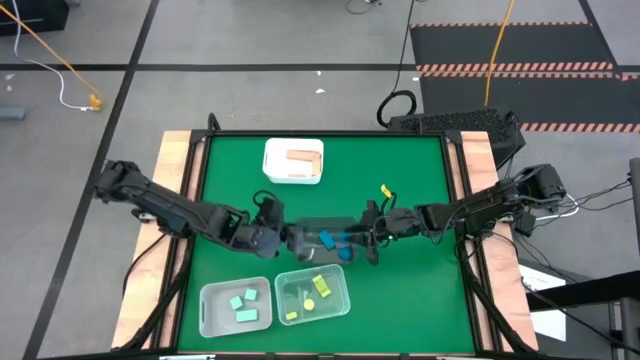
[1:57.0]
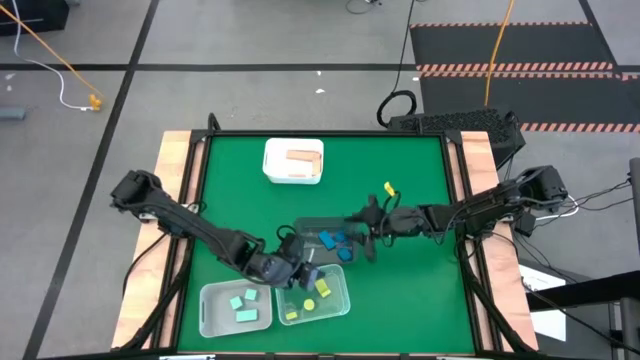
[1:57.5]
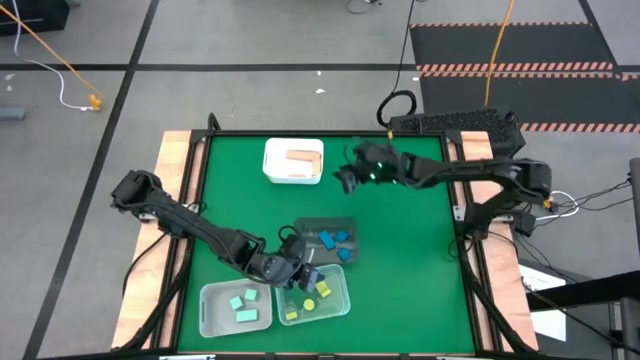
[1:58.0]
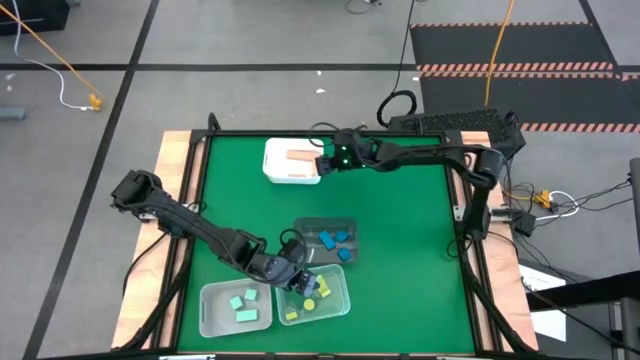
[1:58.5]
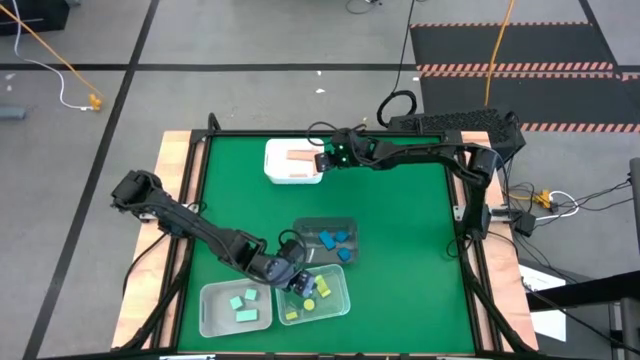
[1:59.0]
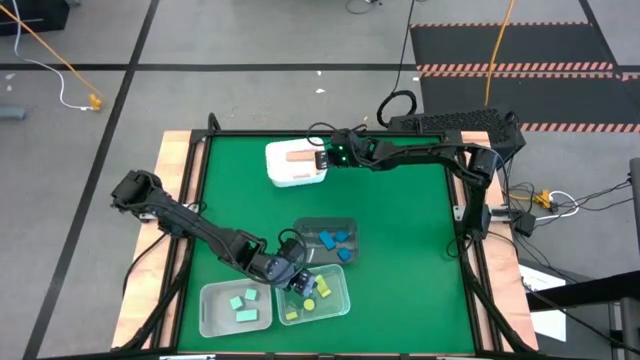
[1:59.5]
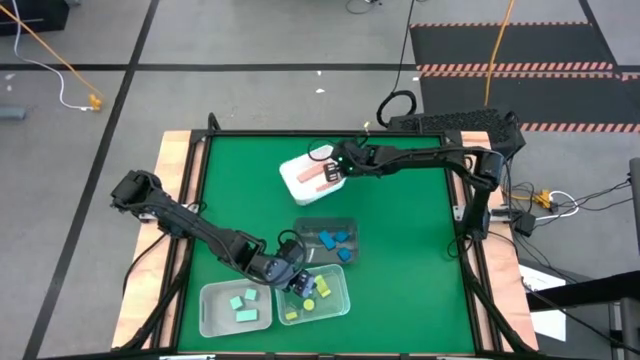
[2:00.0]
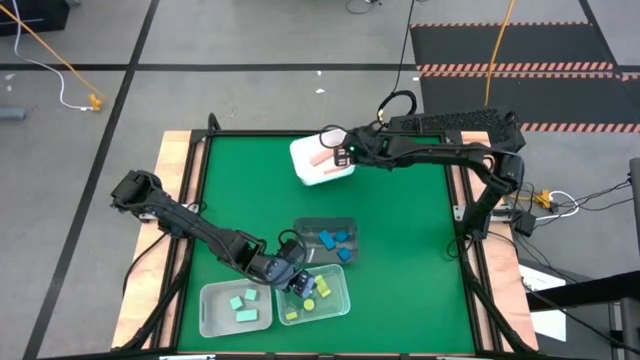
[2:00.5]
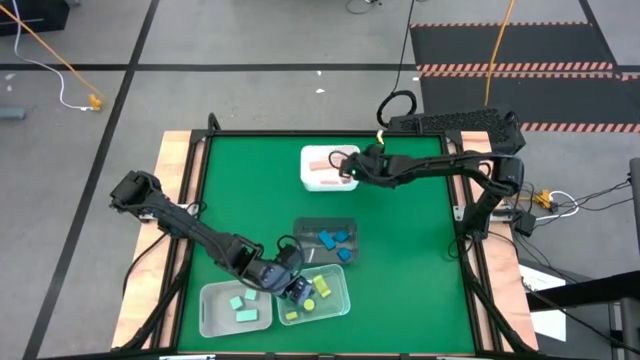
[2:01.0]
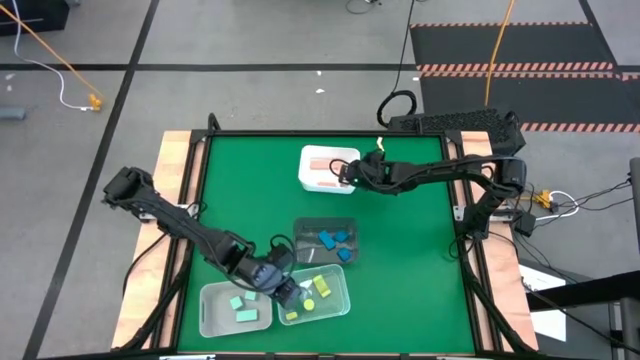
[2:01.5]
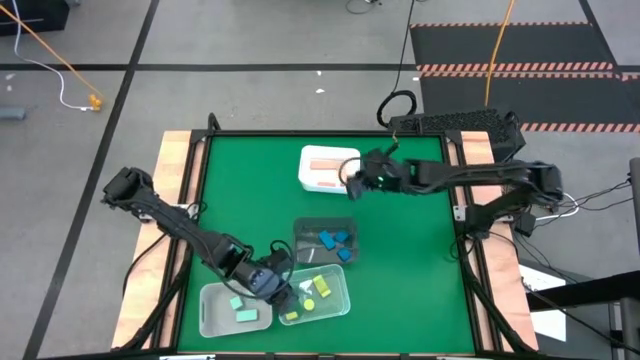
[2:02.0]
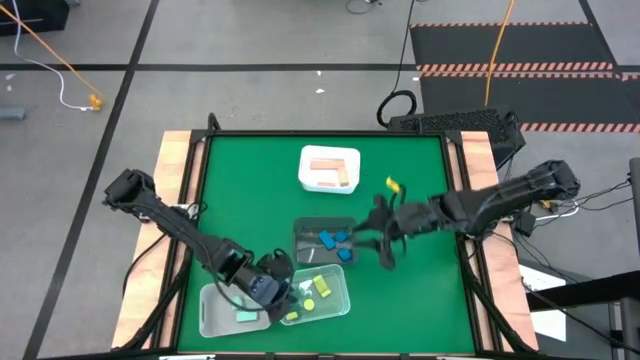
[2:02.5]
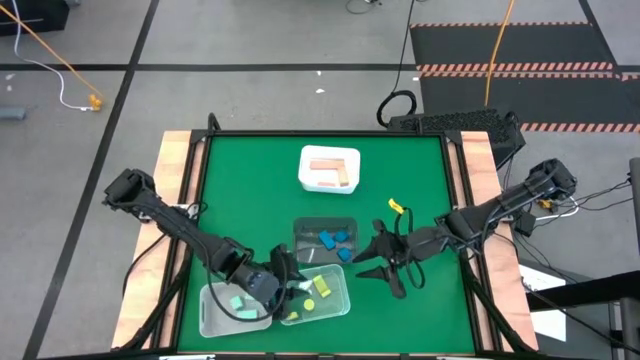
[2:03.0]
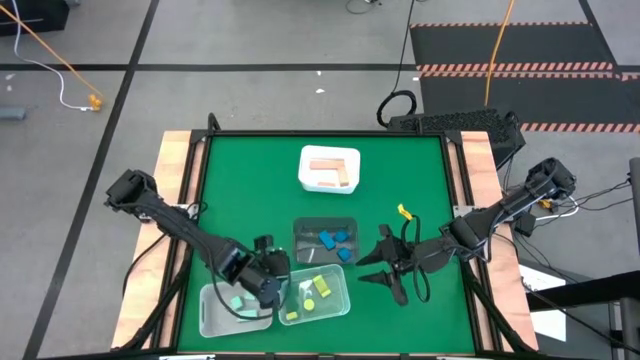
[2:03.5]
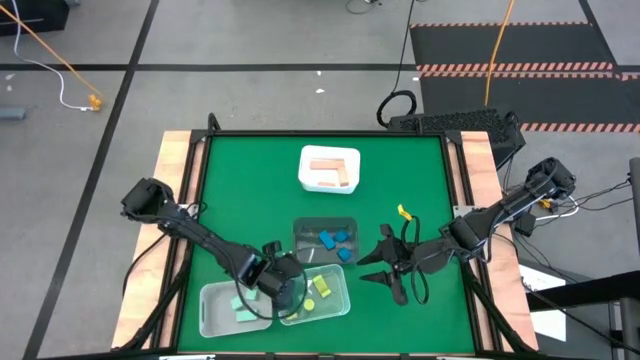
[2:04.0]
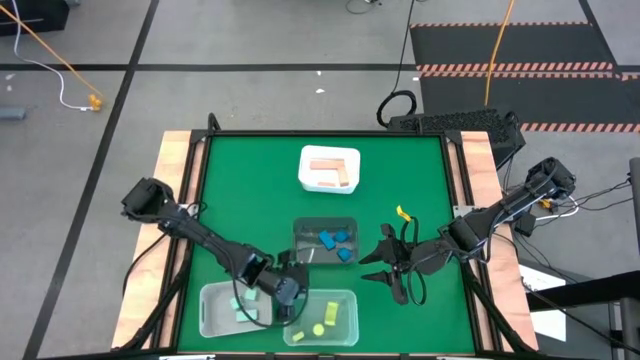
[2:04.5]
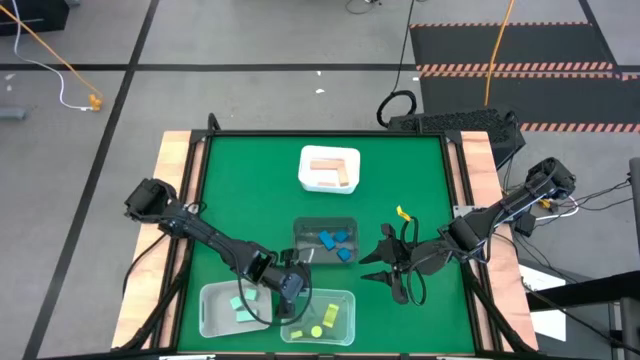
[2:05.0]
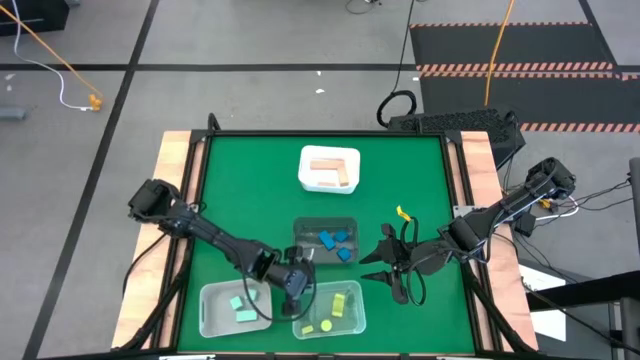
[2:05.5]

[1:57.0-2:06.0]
Task: Sort & place blocks by color
Adjust the bins

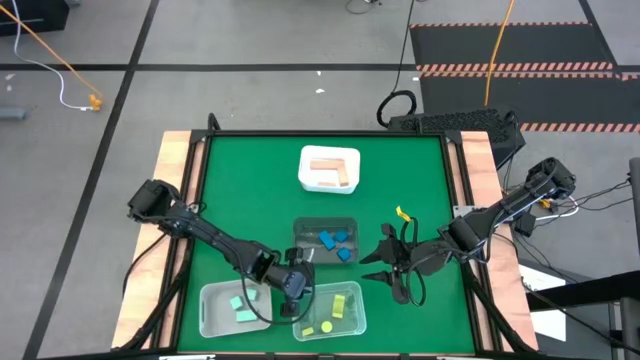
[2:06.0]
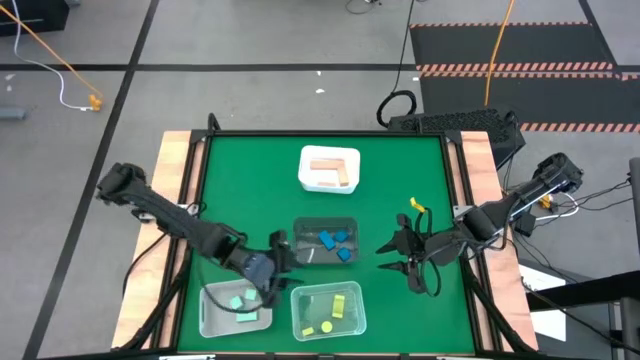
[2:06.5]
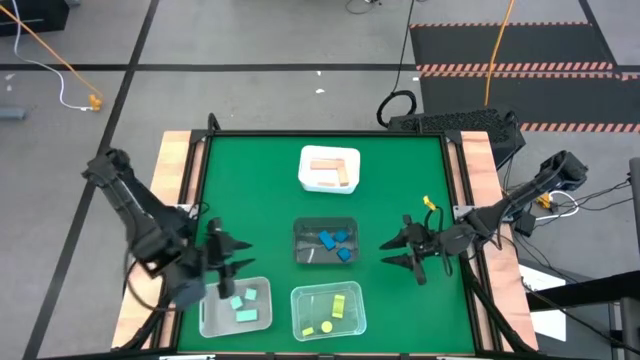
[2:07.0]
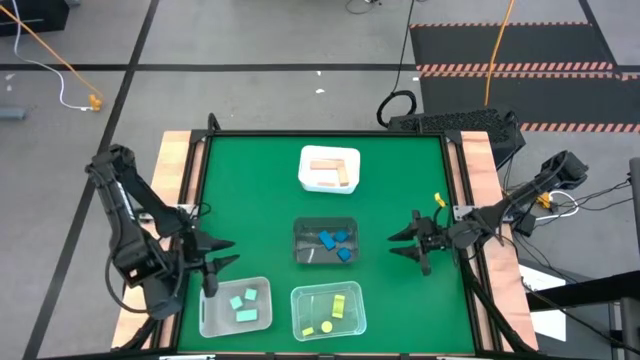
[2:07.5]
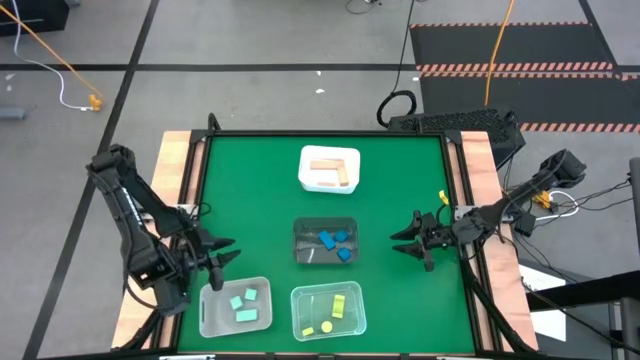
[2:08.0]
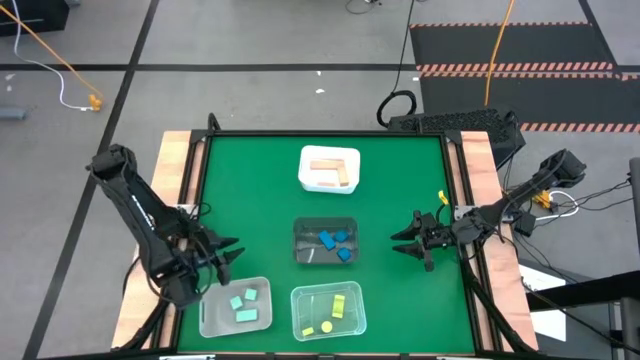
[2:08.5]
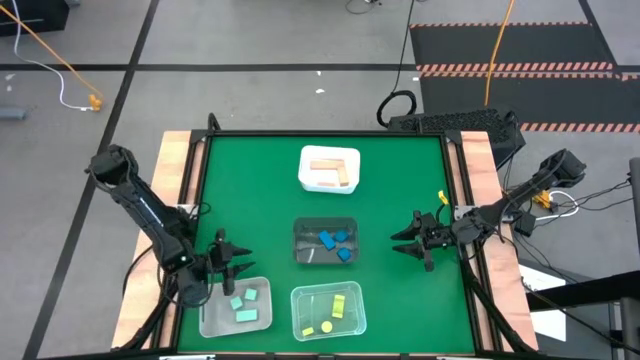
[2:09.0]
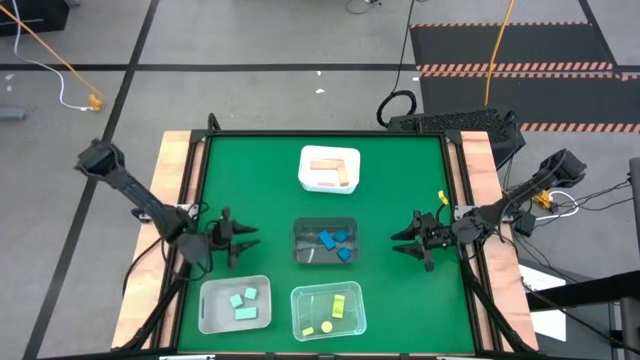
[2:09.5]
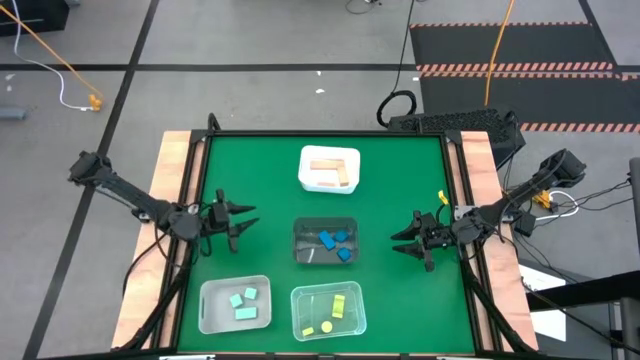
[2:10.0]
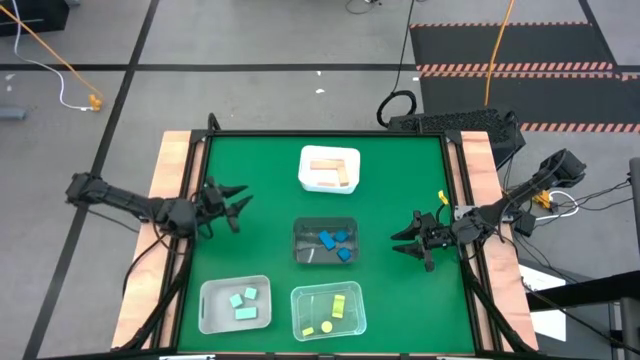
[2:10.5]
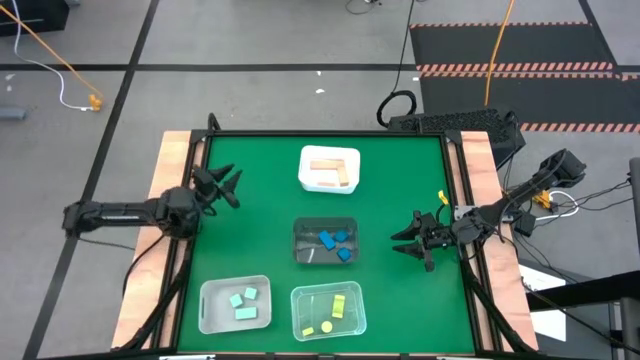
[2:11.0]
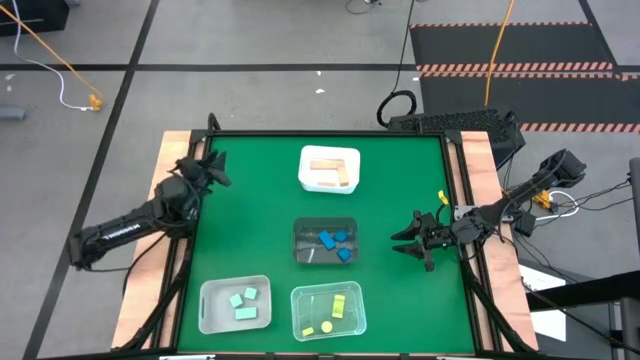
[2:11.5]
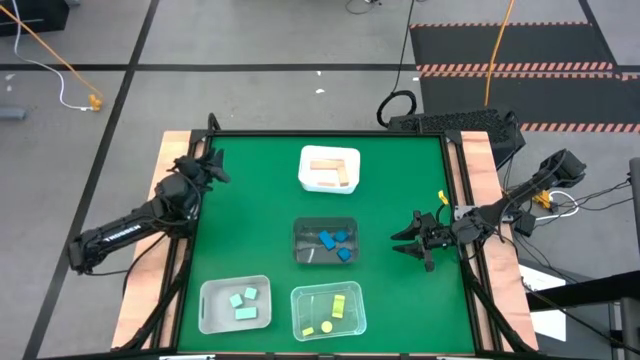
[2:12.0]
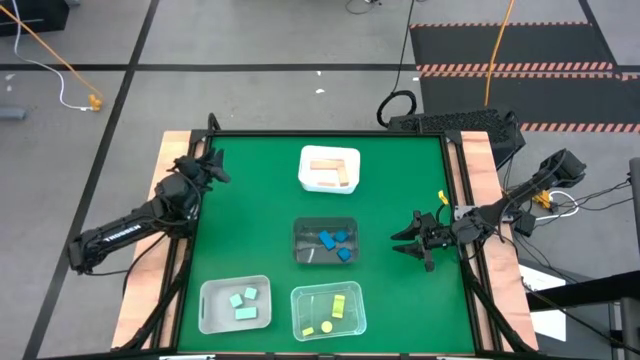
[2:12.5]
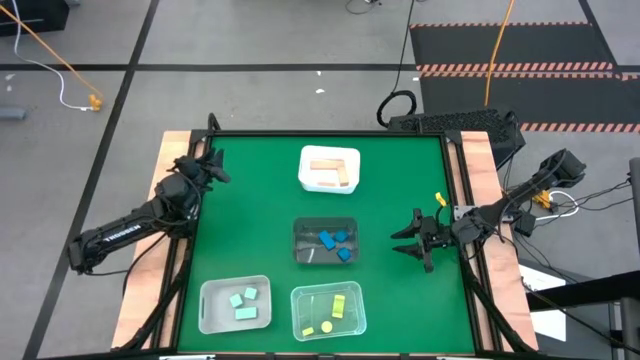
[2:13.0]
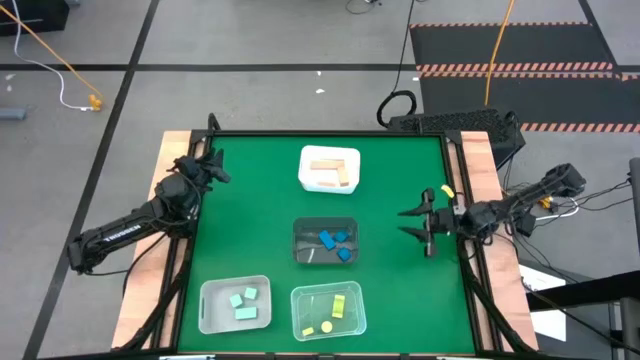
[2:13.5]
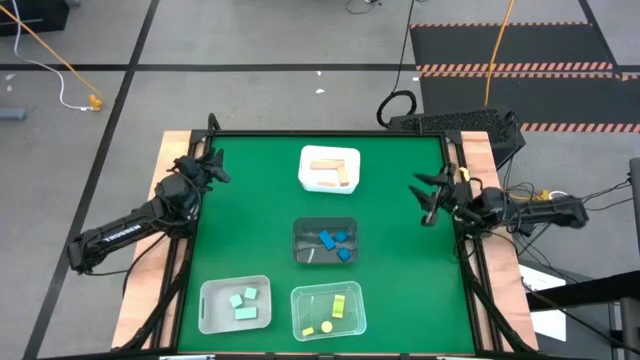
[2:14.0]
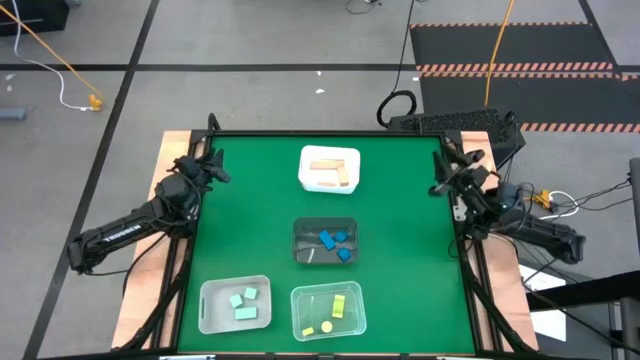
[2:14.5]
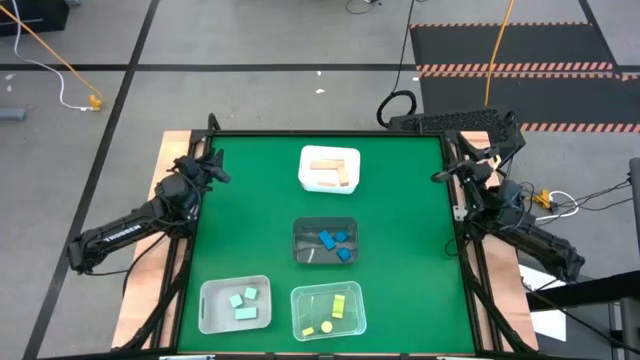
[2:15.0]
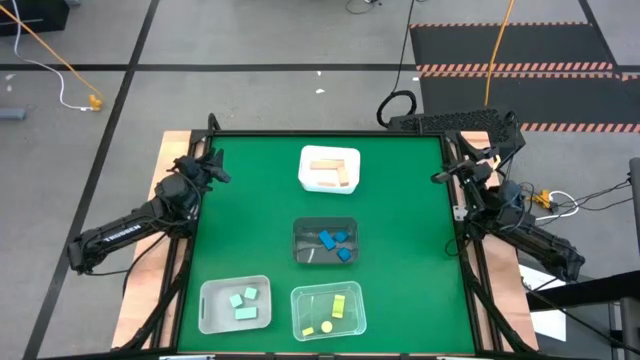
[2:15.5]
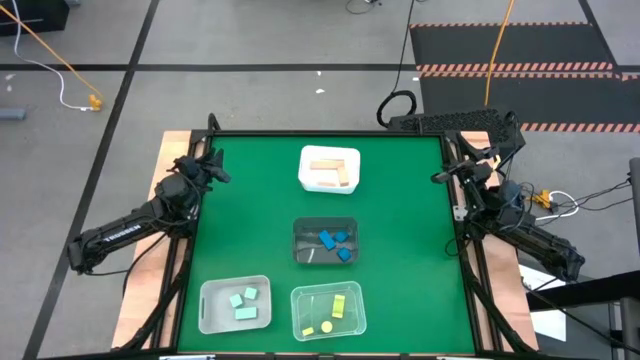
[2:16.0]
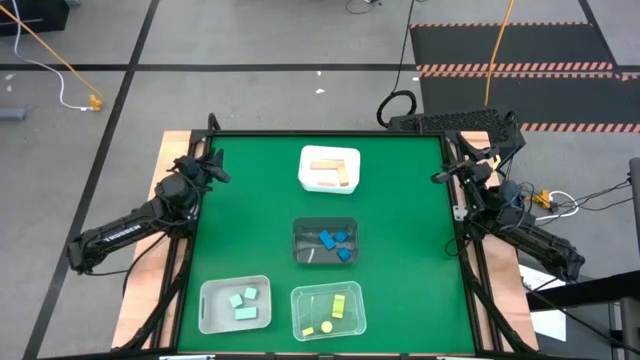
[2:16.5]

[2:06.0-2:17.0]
Return to Home Position
